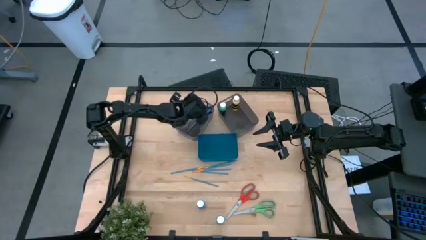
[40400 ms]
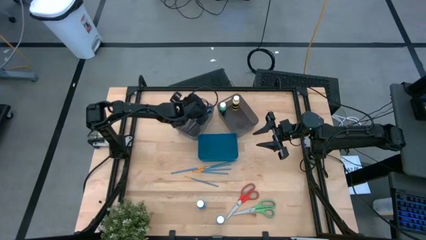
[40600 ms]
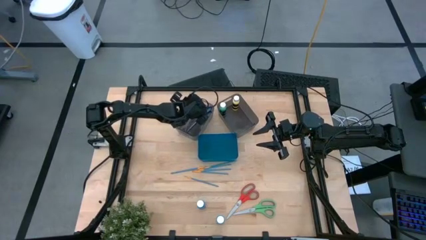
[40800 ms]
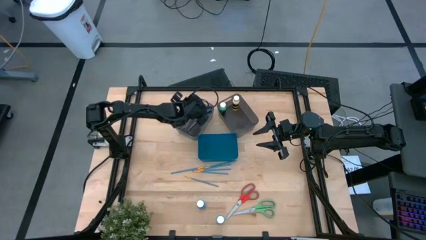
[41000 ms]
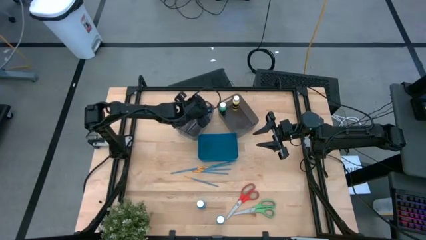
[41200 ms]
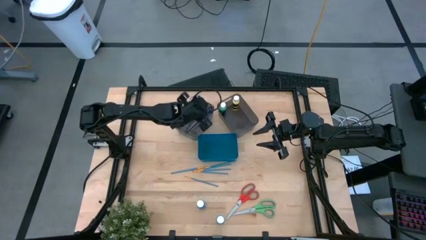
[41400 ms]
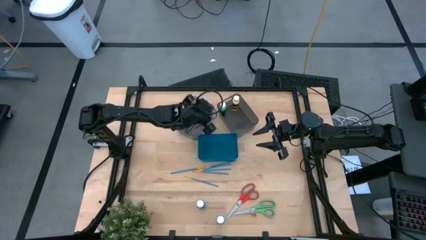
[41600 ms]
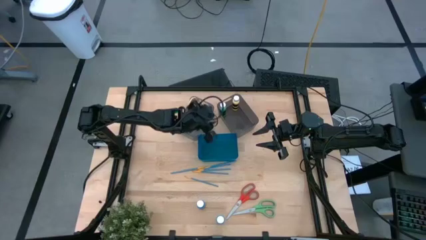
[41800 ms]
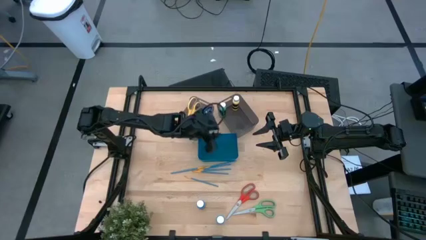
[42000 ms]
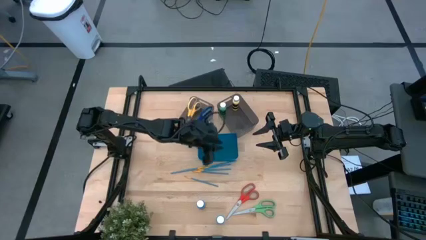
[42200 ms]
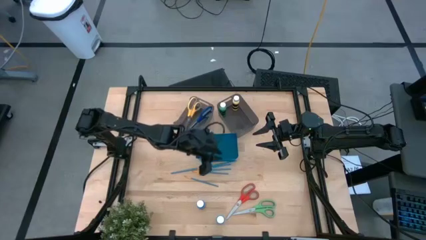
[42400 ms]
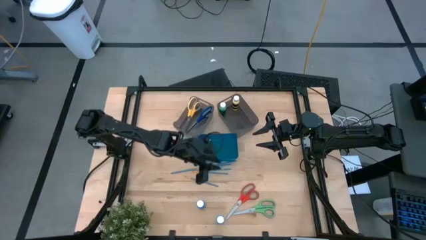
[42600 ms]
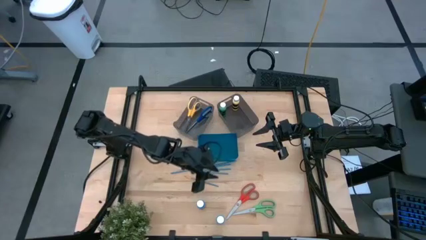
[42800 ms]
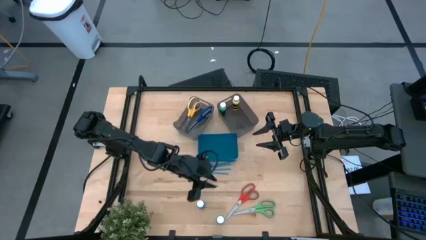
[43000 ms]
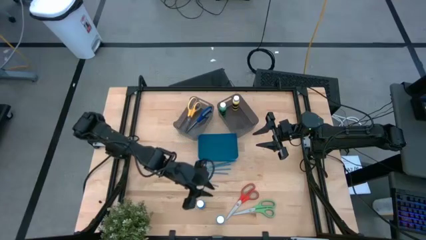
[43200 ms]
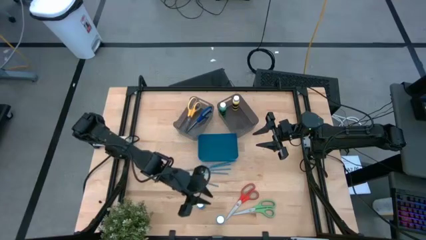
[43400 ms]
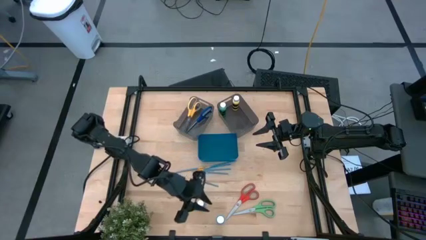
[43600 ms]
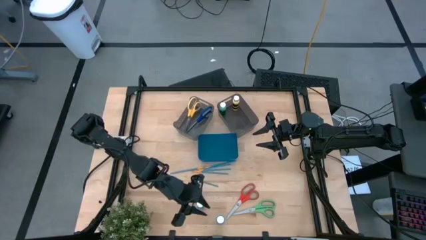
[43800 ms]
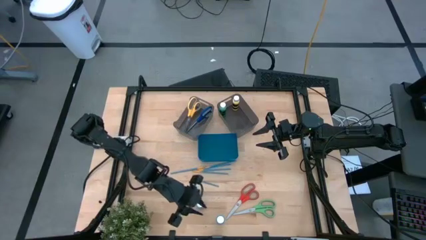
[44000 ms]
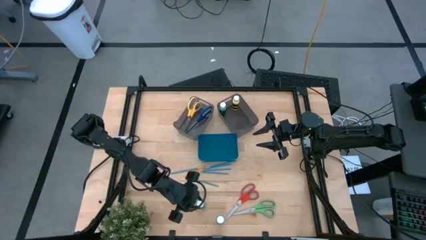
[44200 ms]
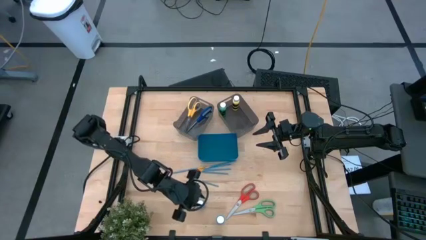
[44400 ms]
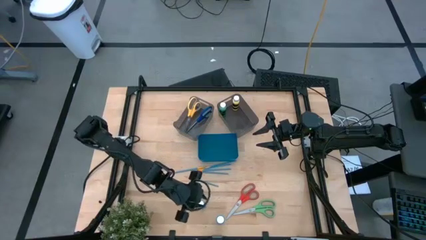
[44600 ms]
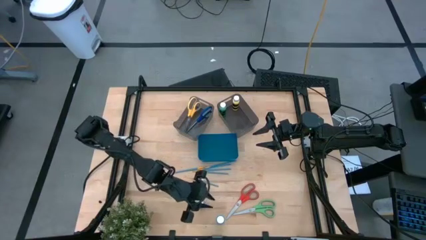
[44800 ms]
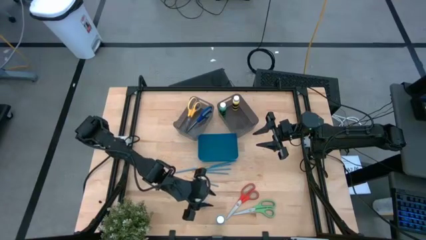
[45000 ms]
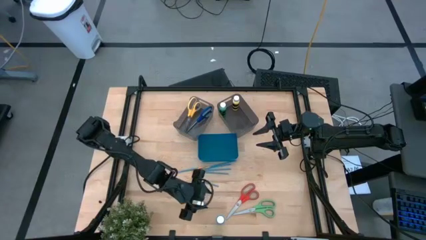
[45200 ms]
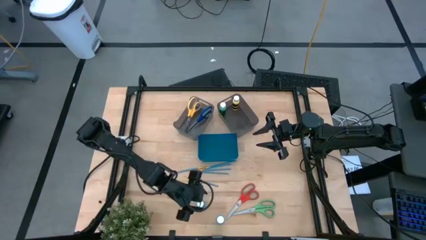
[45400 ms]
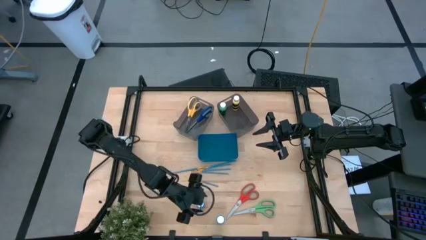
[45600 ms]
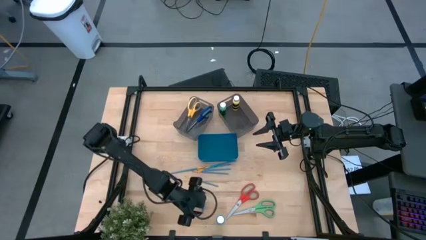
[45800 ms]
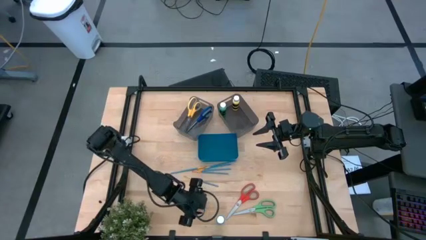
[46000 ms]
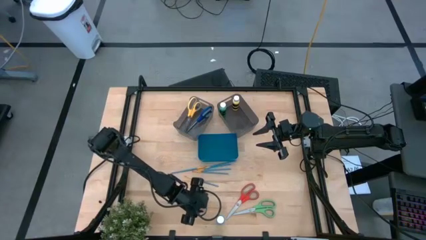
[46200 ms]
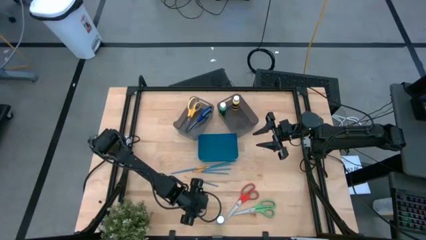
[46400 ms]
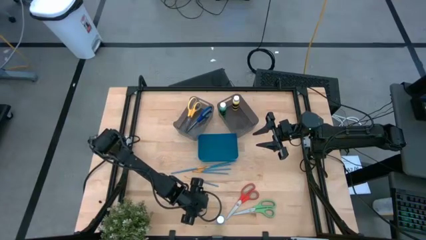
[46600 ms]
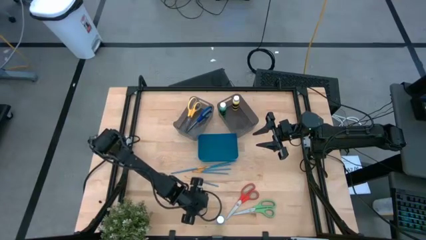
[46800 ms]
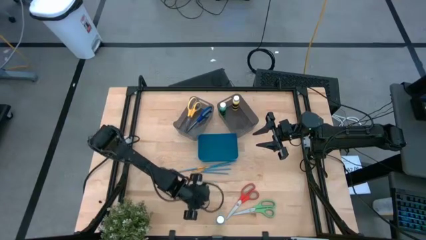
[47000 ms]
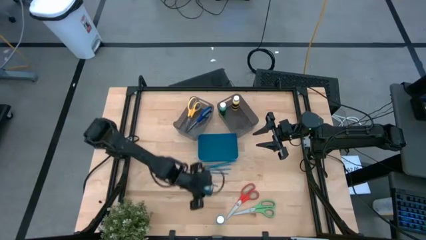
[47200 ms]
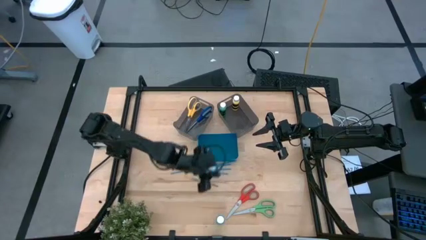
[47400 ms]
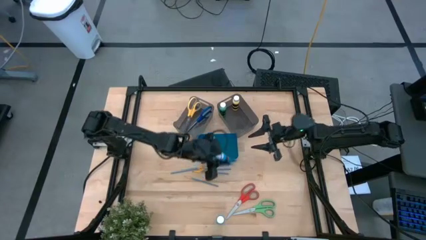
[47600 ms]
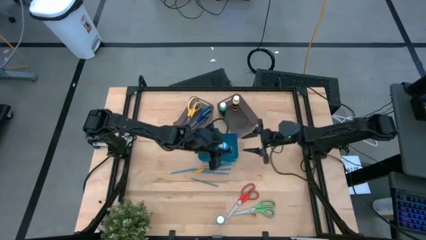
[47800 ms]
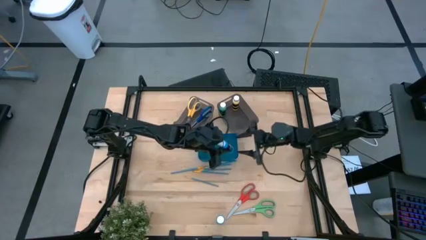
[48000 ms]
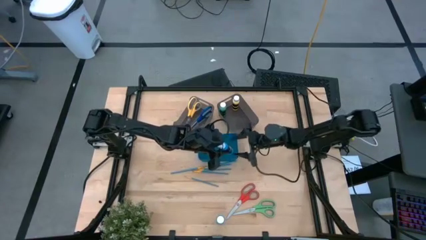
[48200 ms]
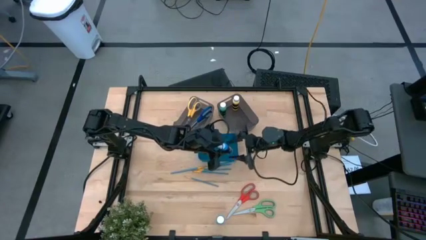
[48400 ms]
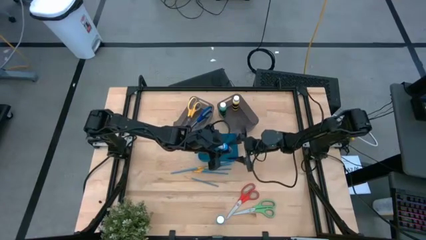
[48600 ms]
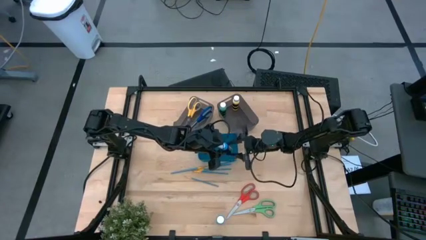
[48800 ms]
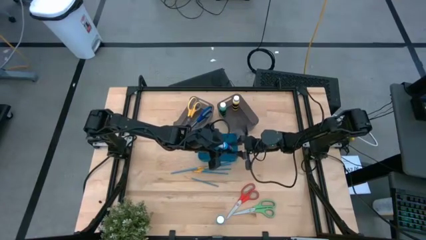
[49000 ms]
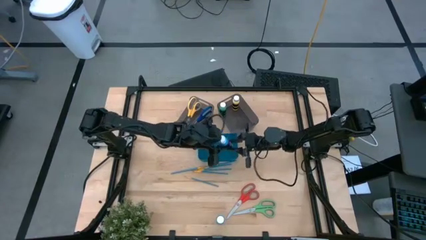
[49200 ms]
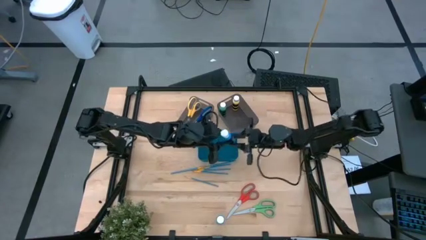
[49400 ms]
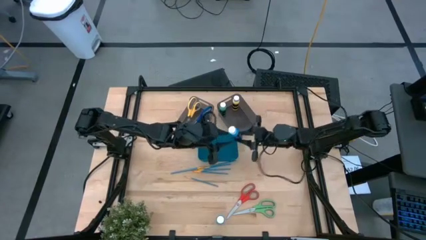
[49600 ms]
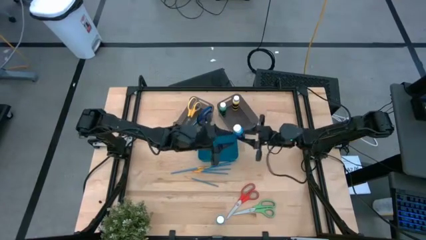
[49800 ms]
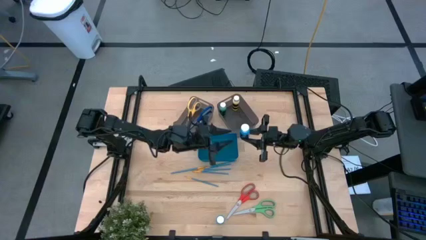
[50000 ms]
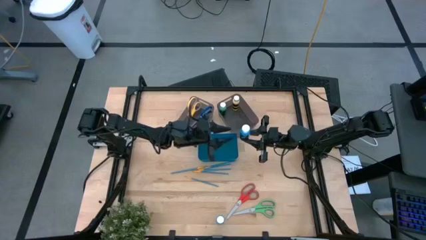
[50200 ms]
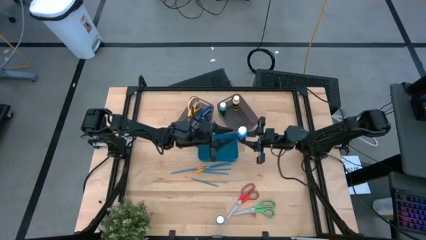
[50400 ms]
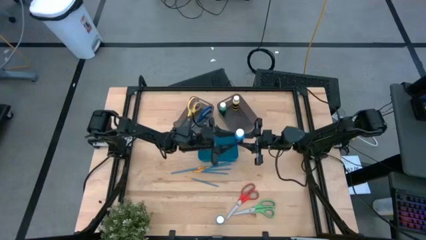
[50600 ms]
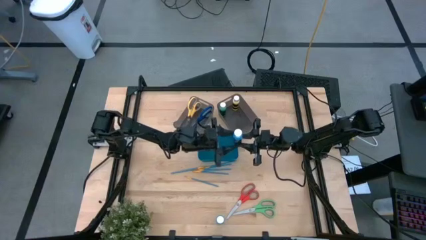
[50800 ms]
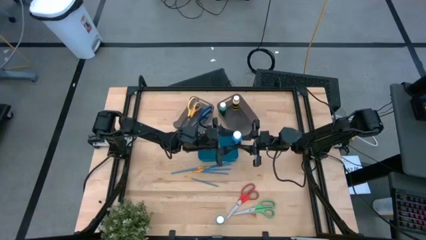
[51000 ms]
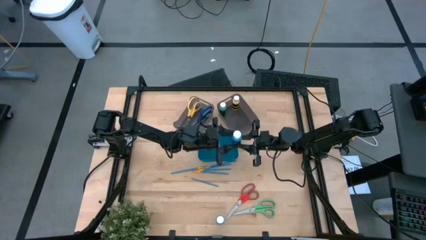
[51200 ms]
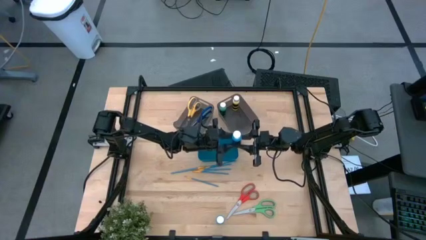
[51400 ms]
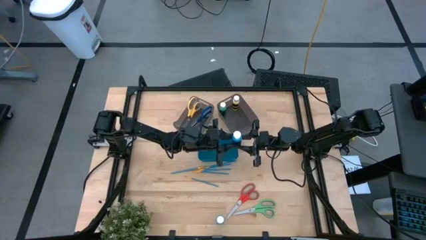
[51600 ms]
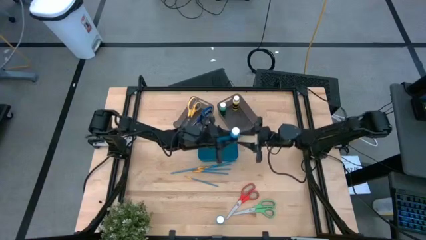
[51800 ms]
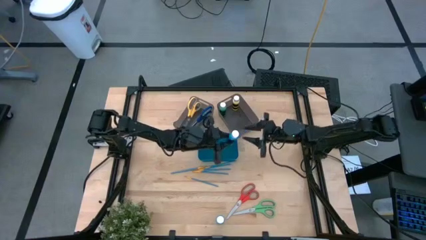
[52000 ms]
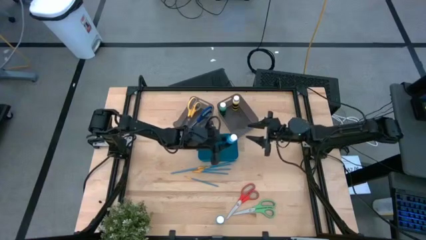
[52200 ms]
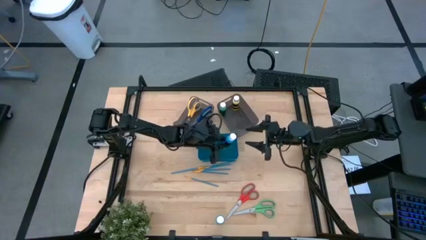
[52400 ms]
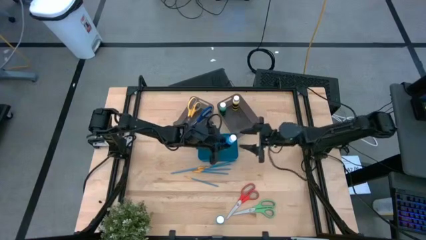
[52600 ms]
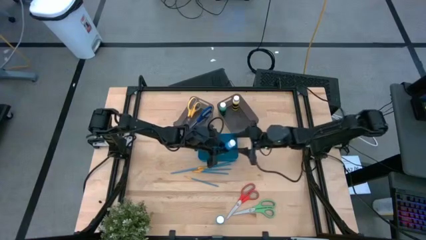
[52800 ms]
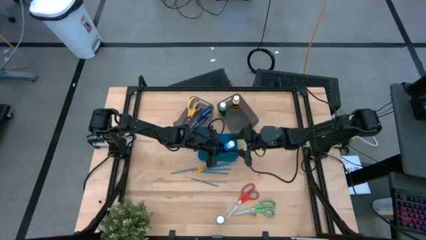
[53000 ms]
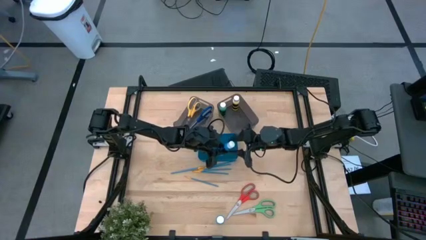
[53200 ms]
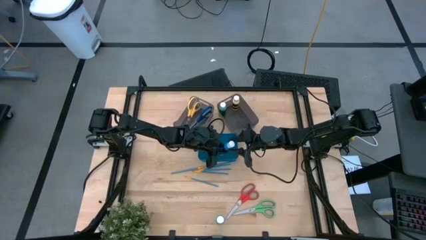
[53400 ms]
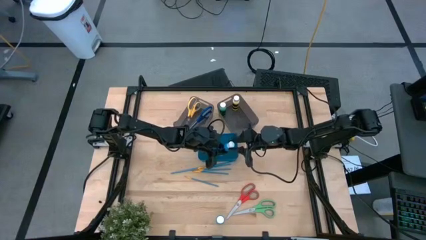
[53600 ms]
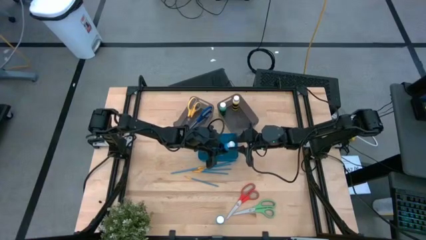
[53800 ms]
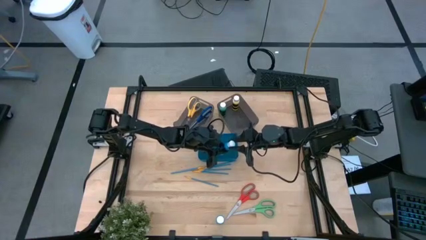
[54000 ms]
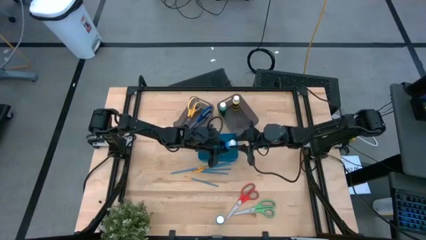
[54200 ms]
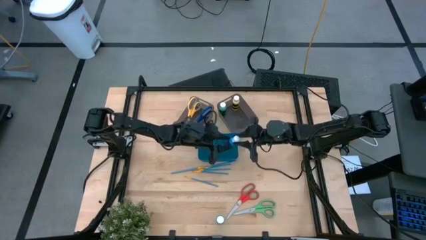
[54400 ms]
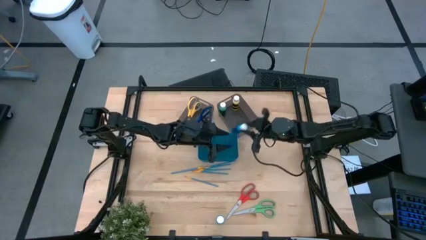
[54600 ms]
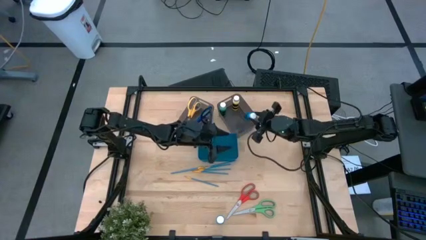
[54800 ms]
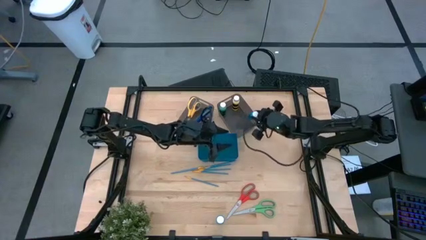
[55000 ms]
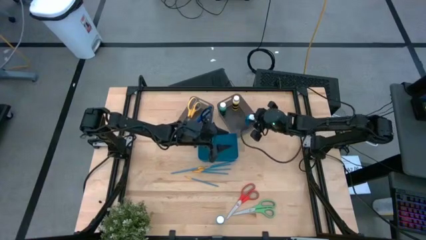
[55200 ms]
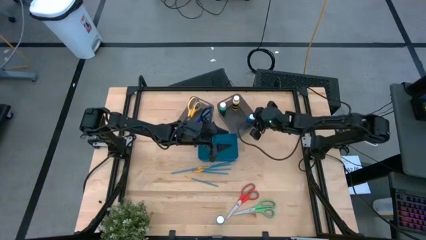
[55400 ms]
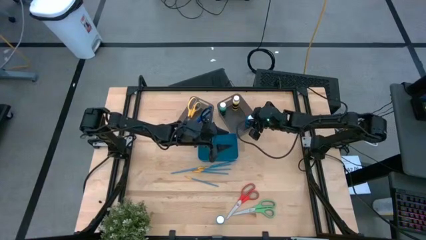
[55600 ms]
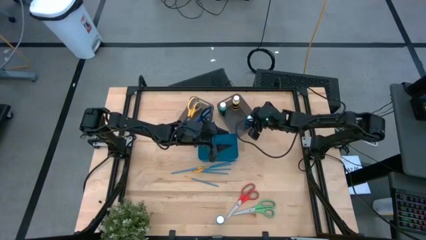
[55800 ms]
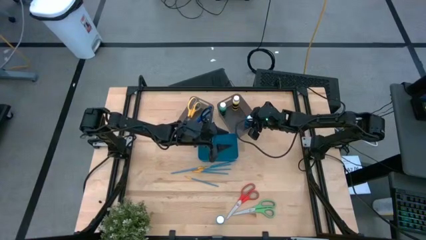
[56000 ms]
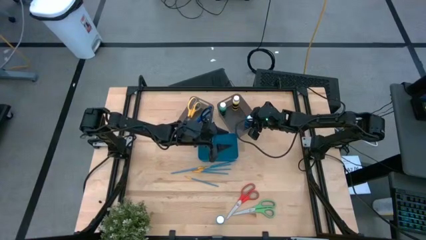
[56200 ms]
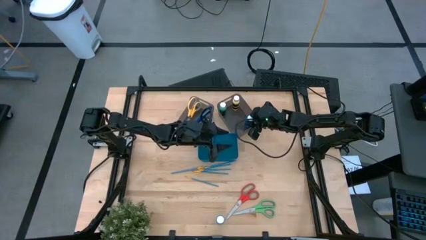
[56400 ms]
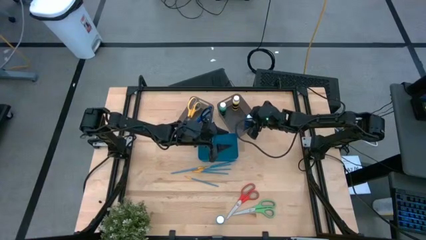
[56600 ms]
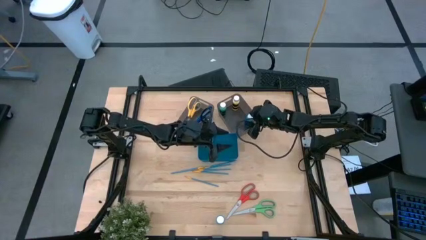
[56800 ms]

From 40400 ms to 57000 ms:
Task: Pick & Place Paint Supplies
Put the blue paint bottle into the right black bin
